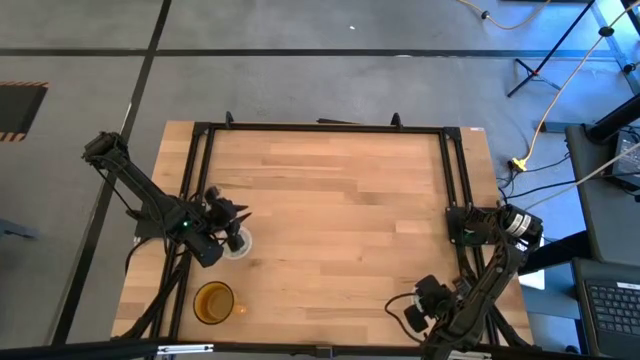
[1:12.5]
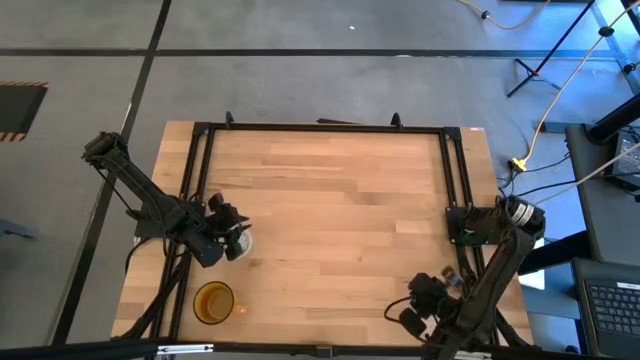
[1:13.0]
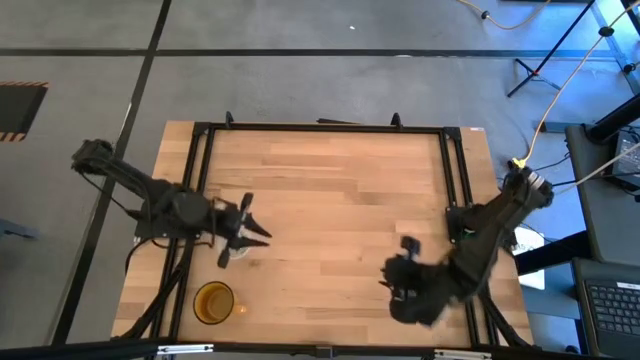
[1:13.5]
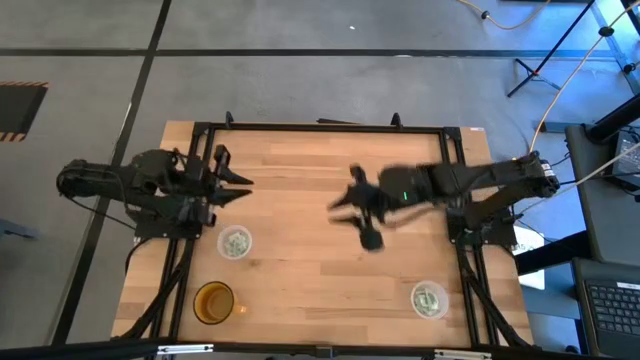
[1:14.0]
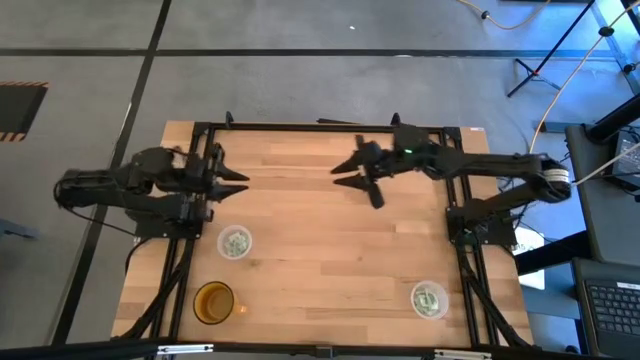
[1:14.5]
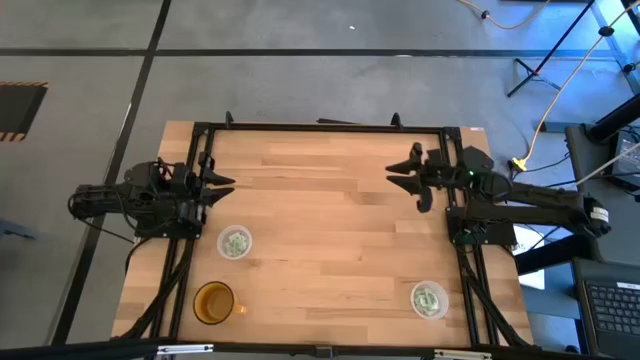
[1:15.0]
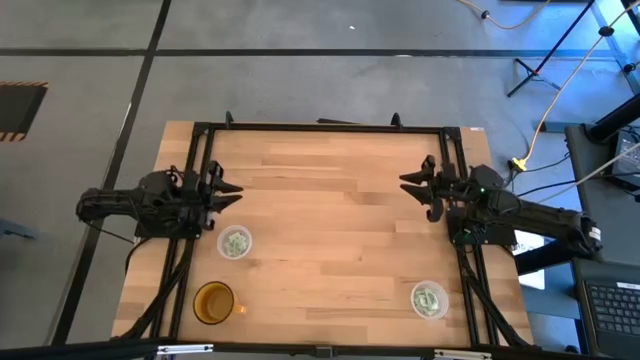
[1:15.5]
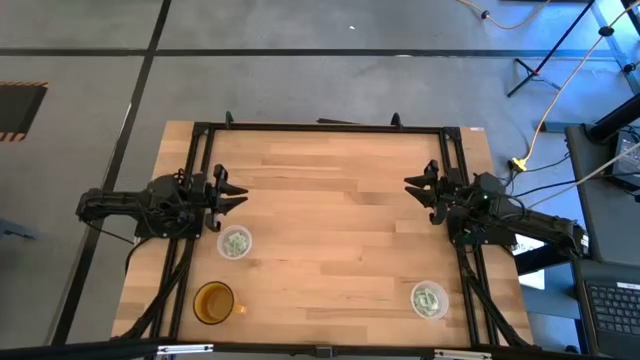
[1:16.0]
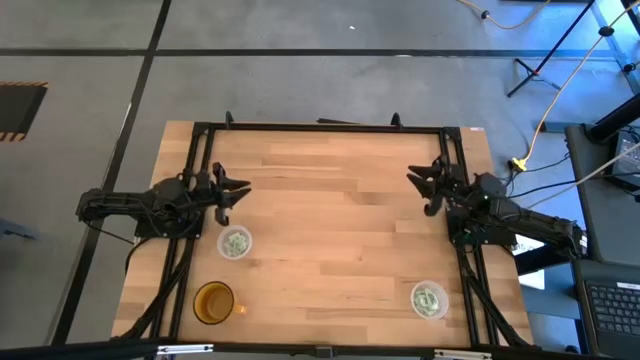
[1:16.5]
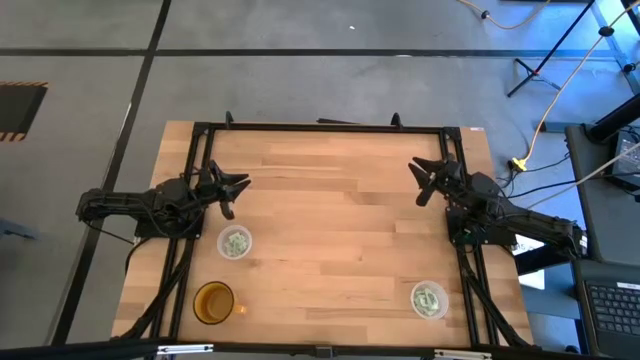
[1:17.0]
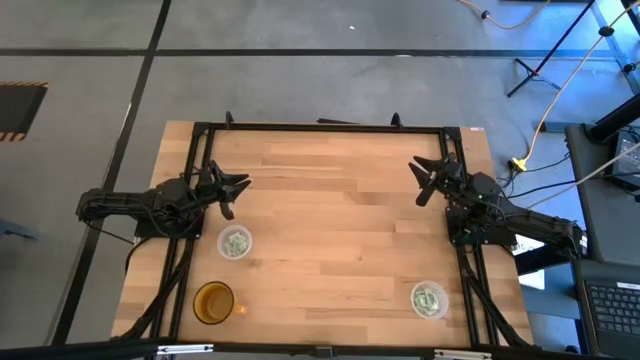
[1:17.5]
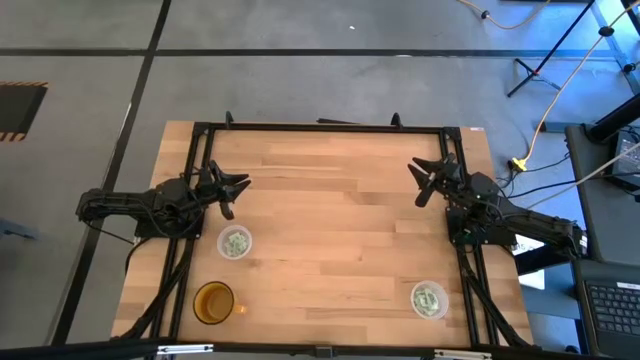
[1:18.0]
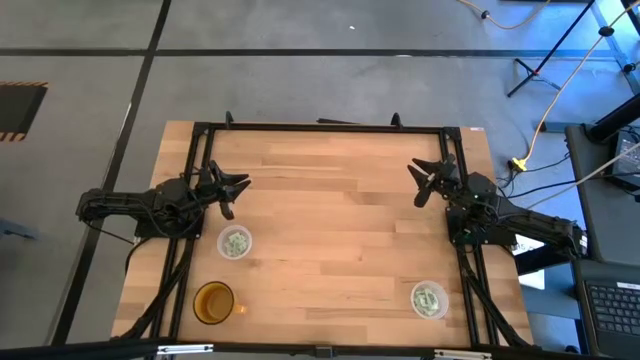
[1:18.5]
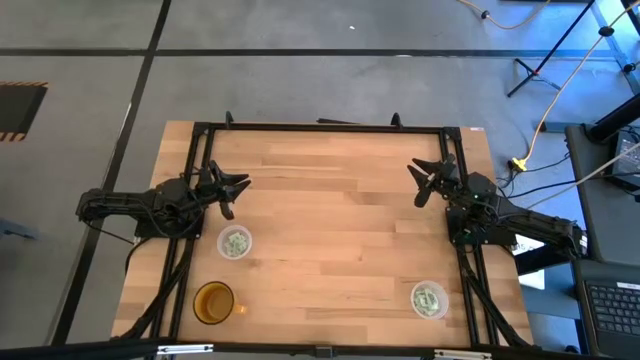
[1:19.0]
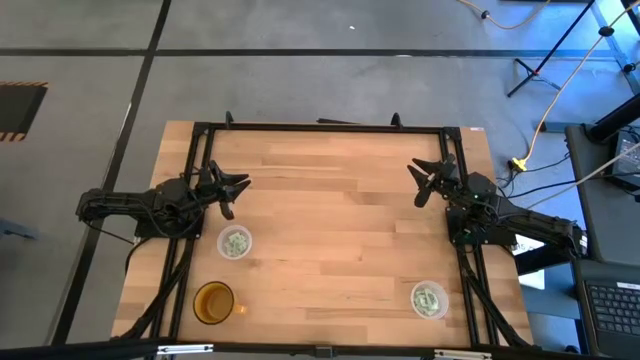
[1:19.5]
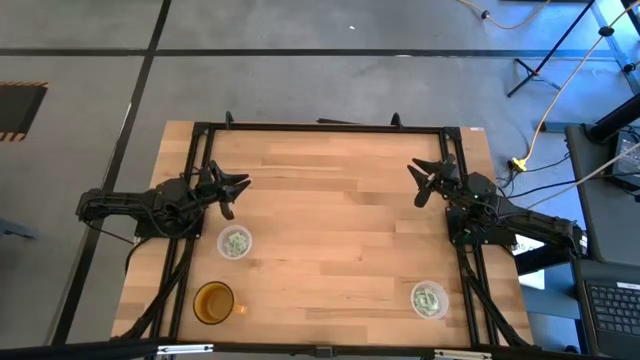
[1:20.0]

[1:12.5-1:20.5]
Task: Pick and place items into bin
Return to Home Position

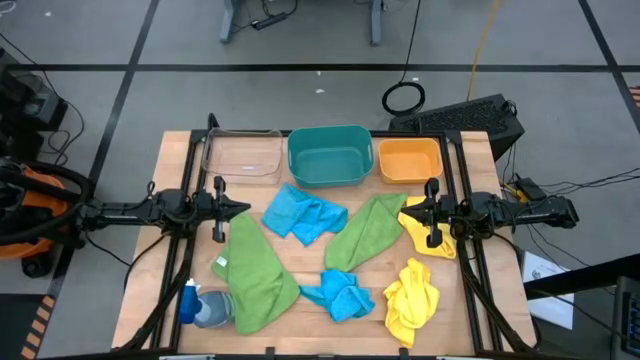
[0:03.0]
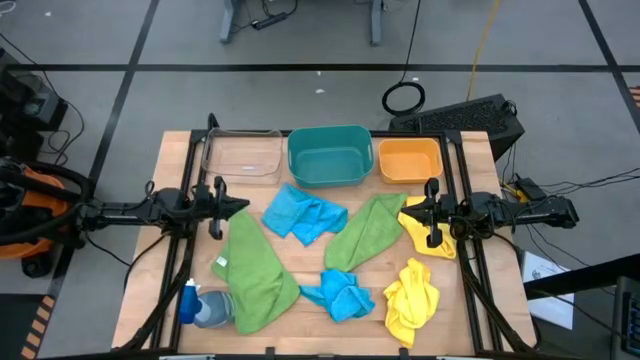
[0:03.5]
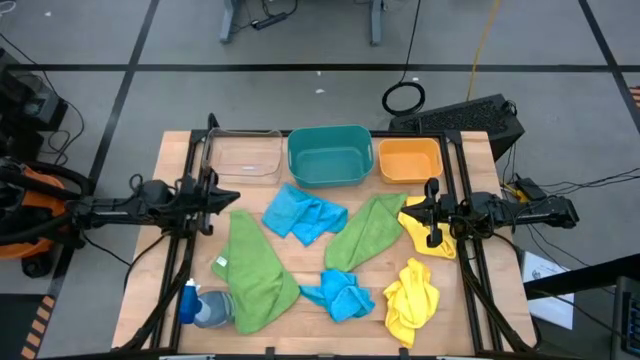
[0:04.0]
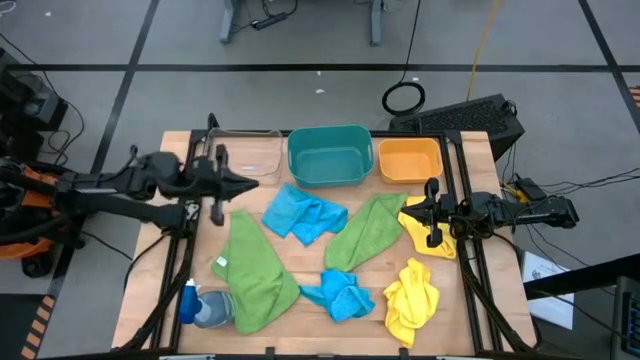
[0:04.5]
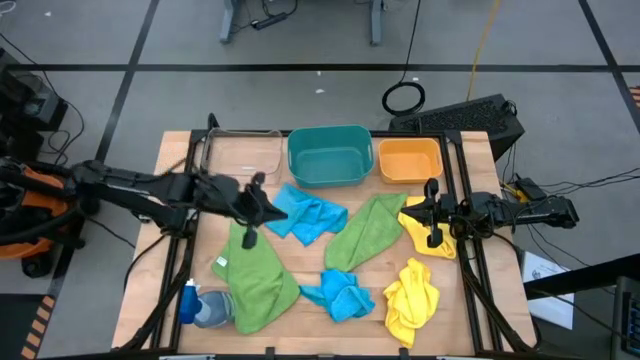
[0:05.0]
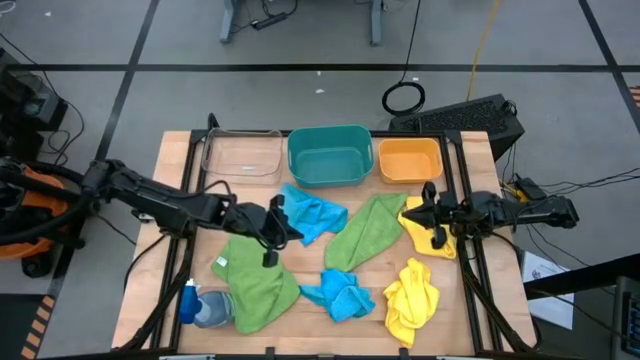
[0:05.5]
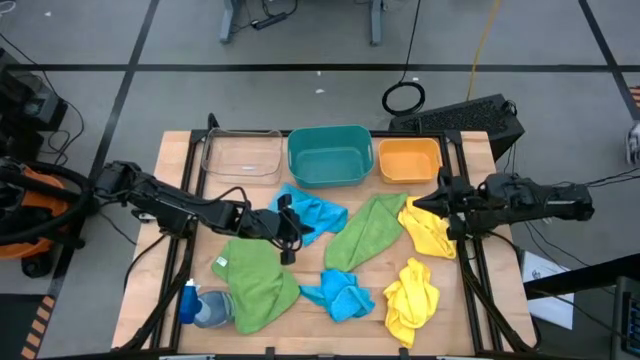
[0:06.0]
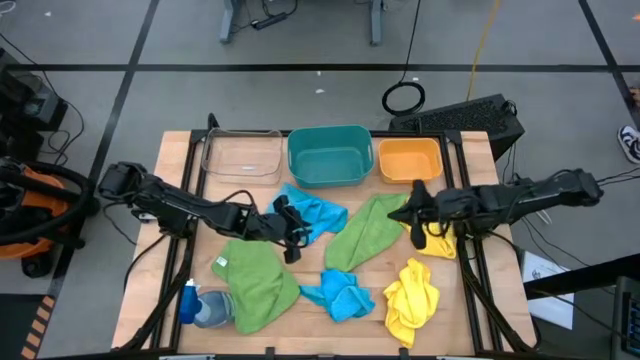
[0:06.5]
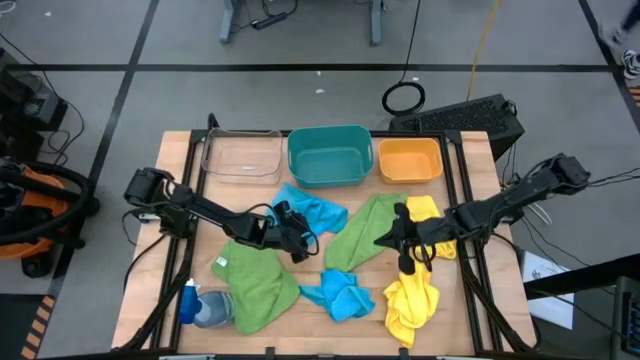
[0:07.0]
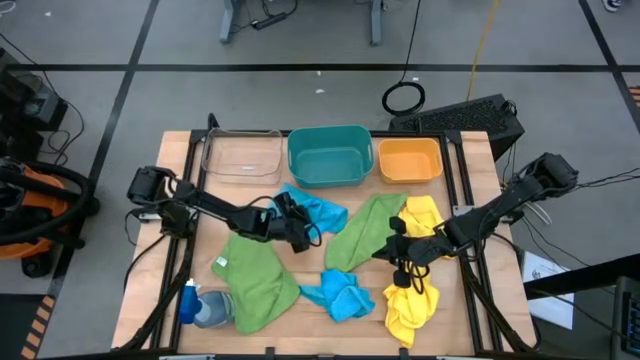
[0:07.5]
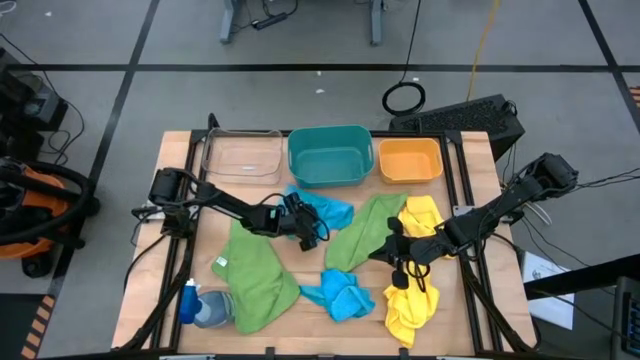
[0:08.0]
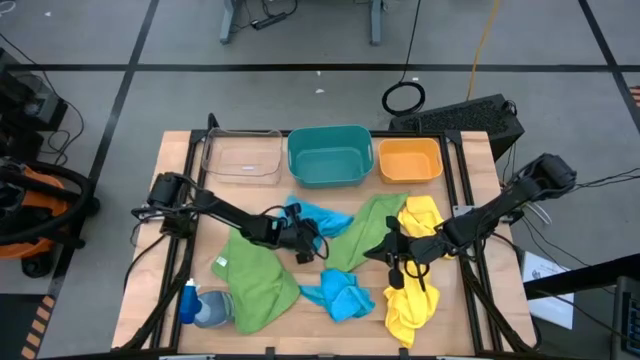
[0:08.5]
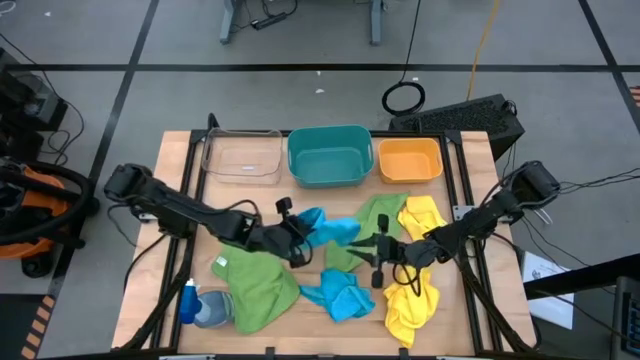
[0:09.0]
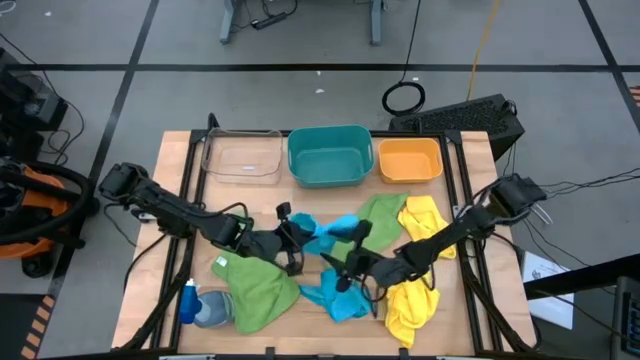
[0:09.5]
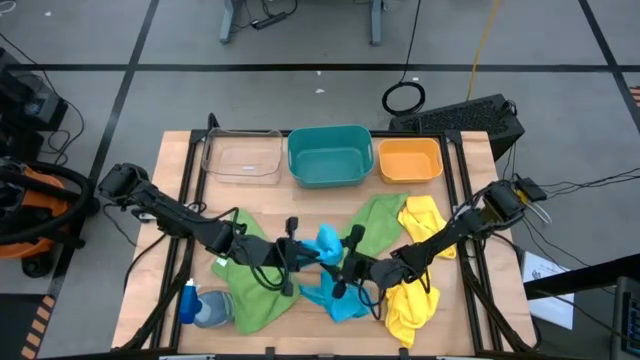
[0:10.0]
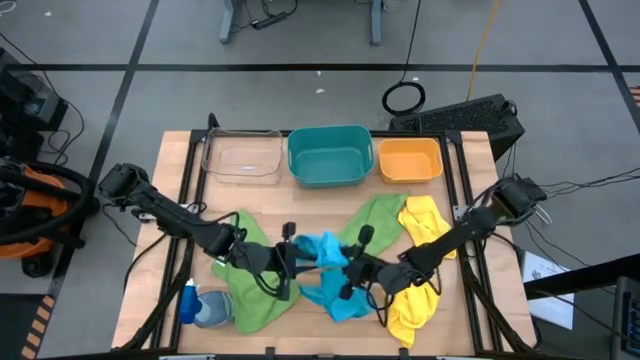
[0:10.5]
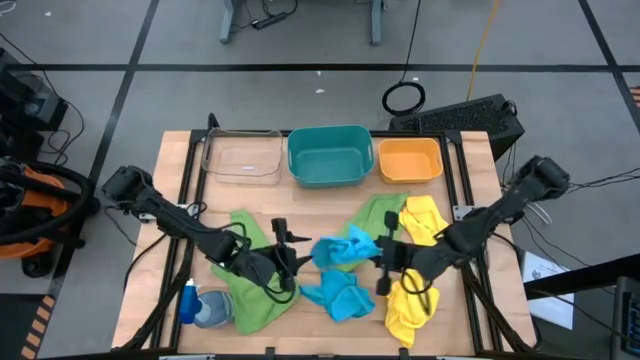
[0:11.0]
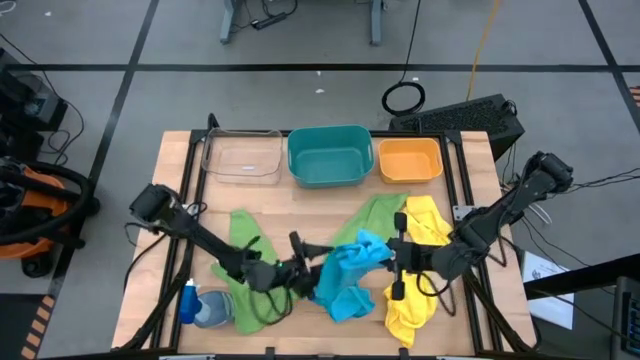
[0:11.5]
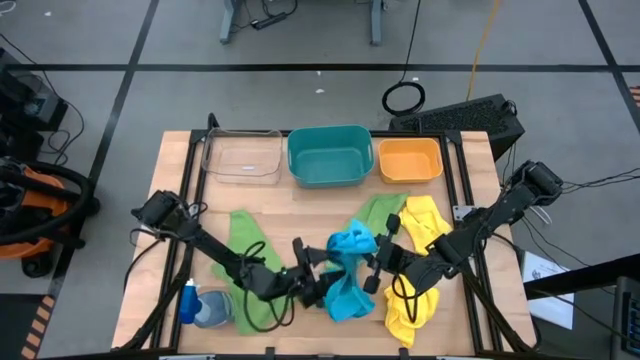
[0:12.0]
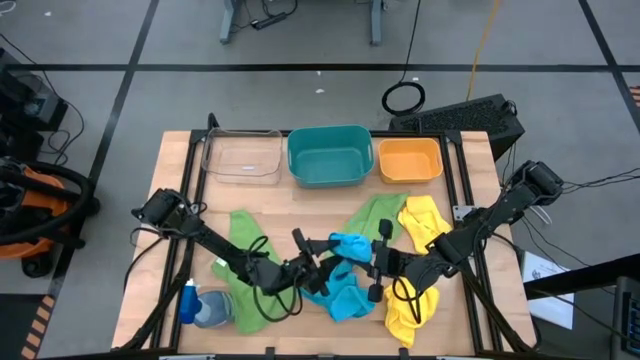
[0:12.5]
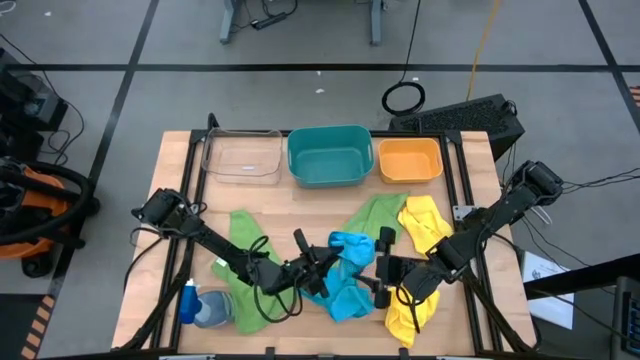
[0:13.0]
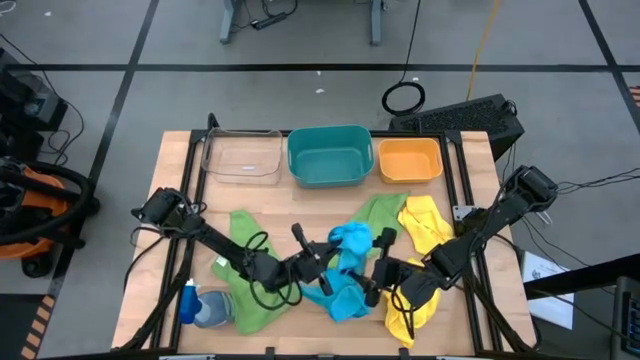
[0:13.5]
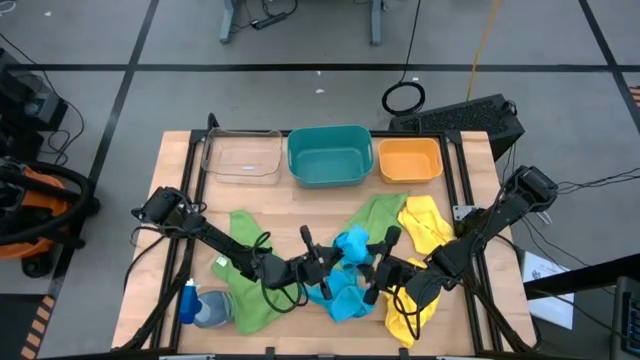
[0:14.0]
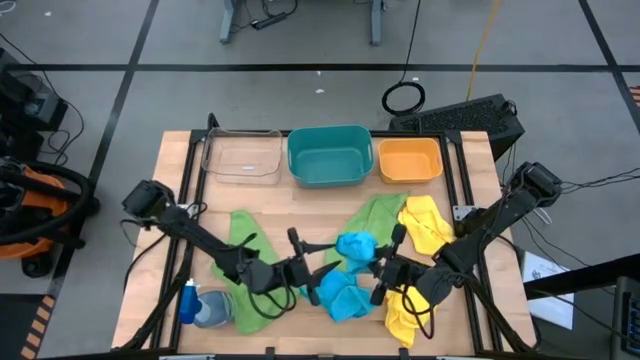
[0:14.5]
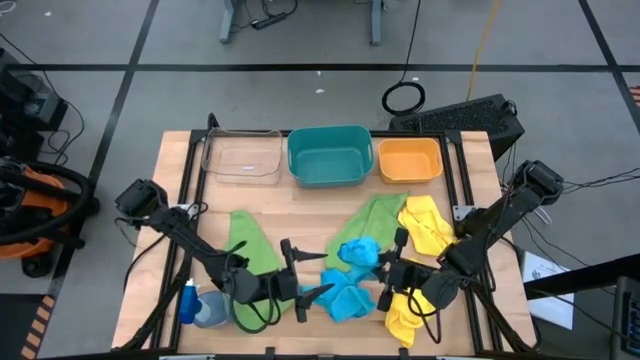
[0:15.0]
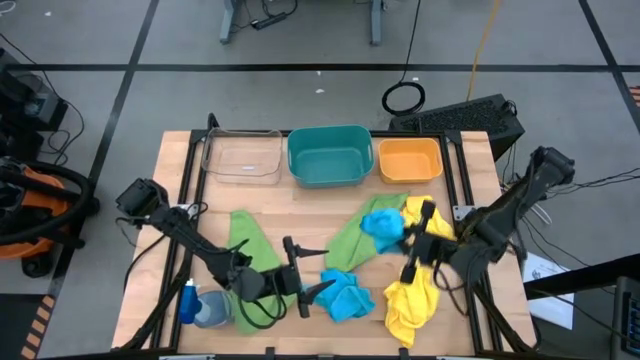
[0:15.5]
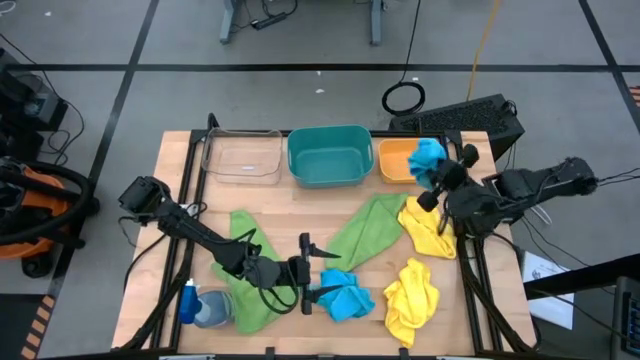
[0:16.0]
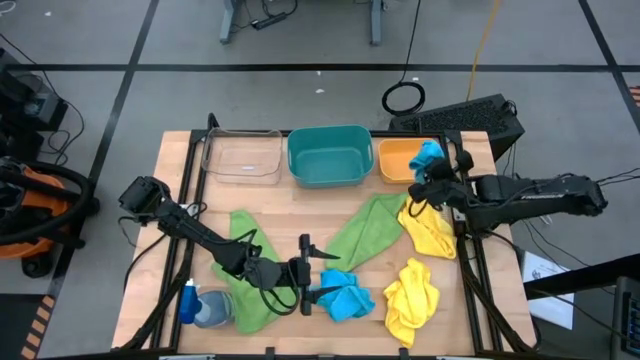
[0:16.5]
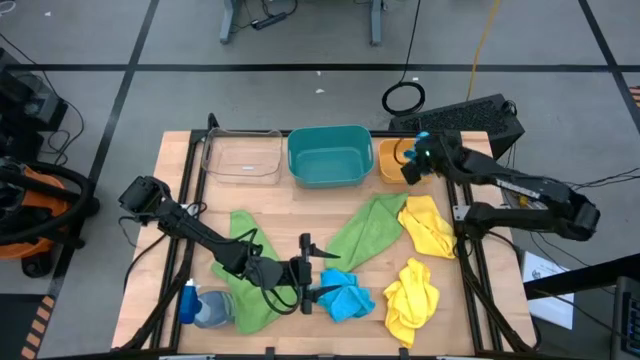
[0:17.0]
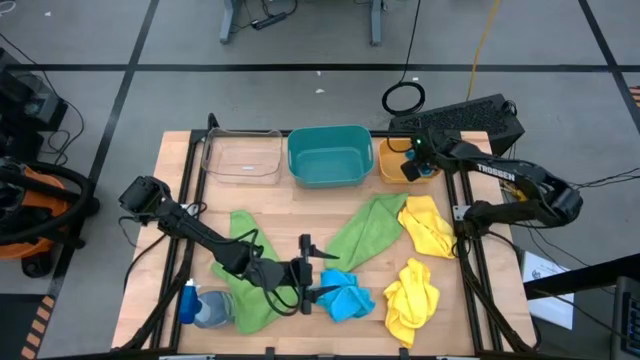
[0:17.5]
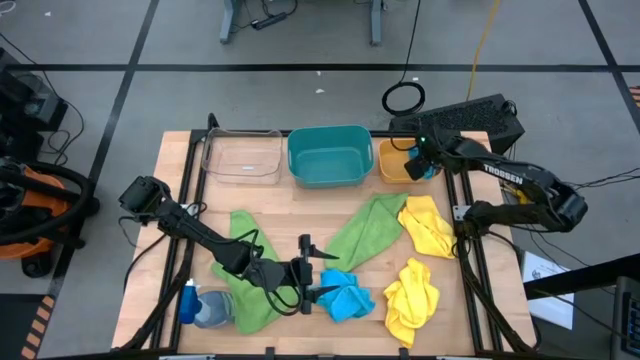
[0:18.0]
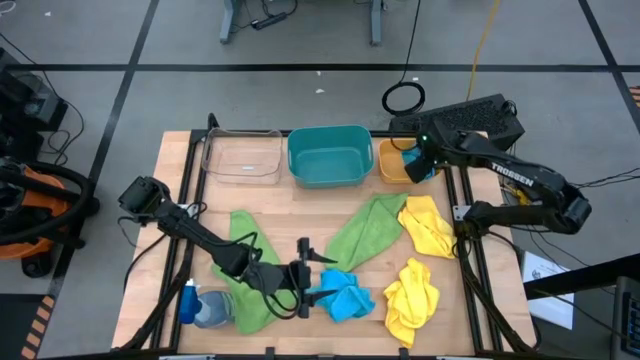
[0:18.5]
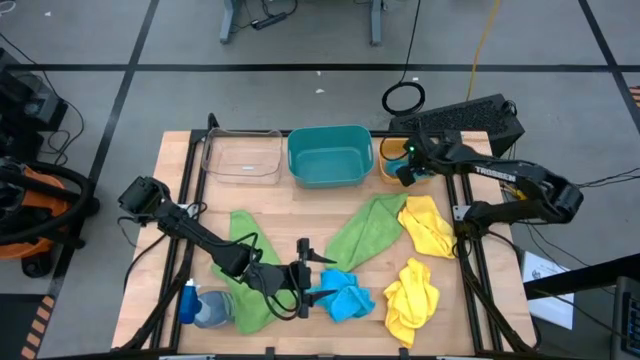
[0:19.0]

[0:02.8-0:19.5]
Task: Sort microfiber towel by color & place in baskets
Put the top blue towel into the yellow bin
